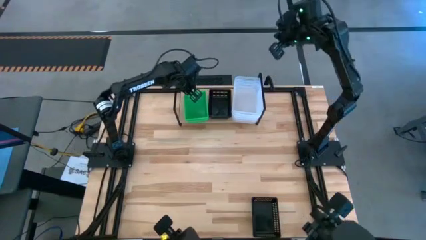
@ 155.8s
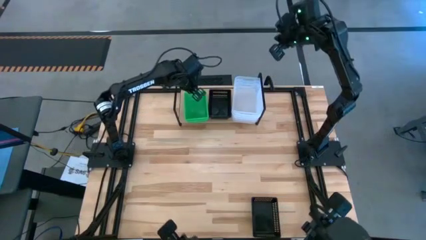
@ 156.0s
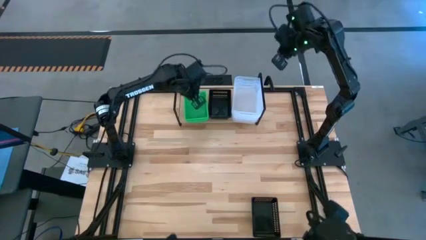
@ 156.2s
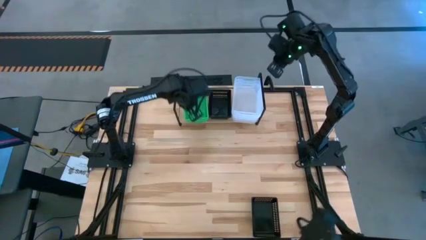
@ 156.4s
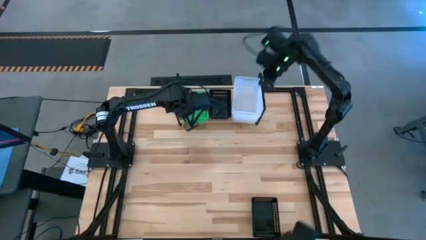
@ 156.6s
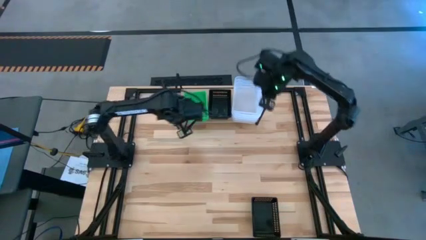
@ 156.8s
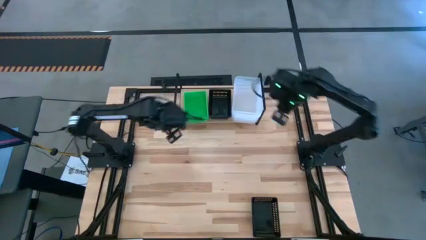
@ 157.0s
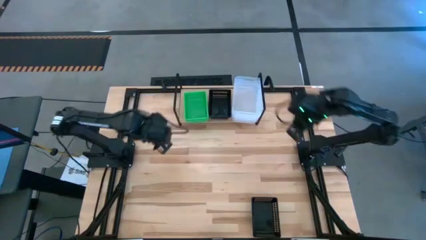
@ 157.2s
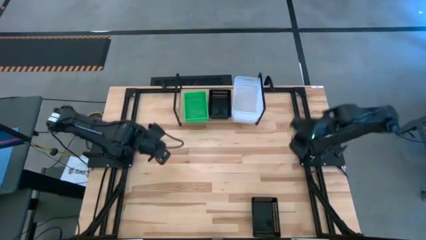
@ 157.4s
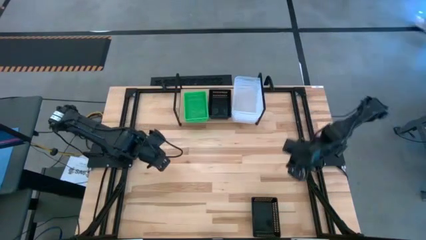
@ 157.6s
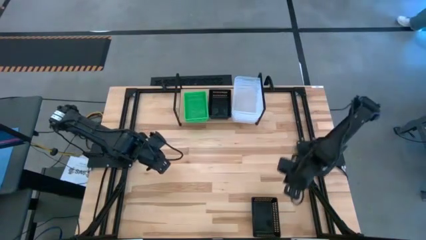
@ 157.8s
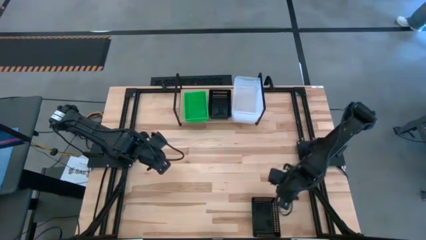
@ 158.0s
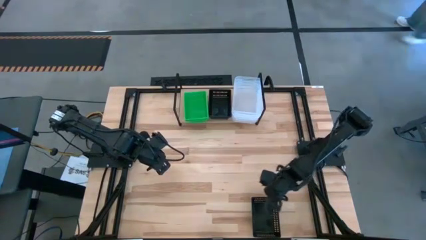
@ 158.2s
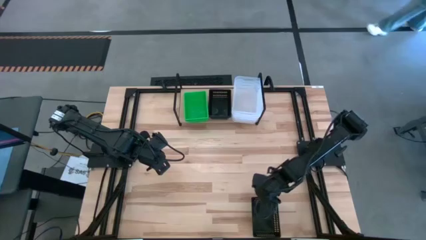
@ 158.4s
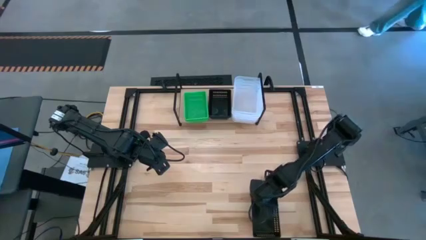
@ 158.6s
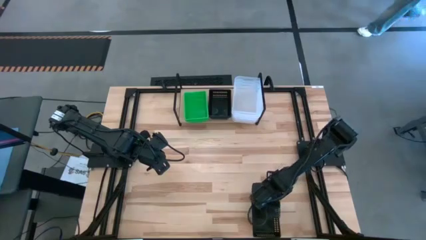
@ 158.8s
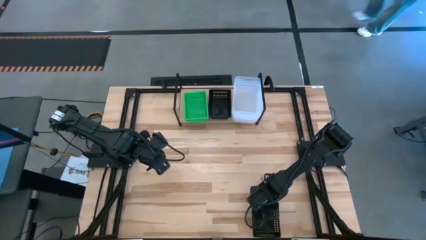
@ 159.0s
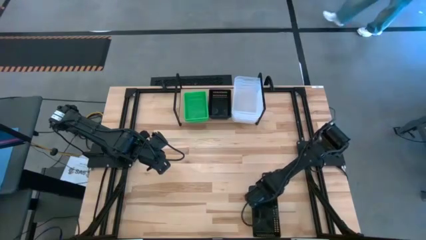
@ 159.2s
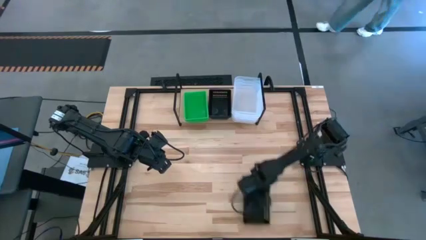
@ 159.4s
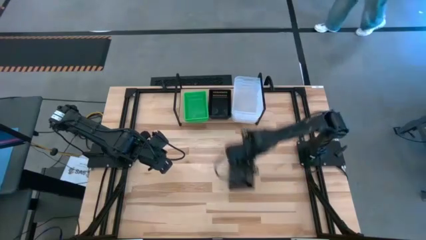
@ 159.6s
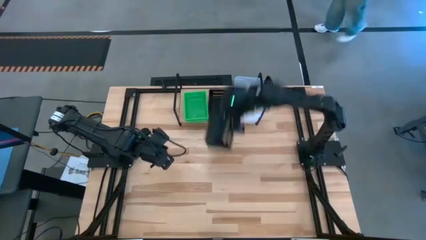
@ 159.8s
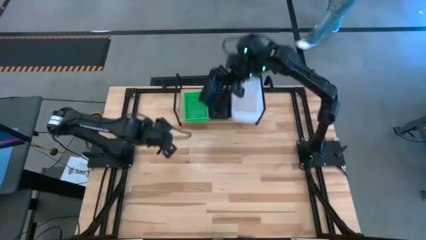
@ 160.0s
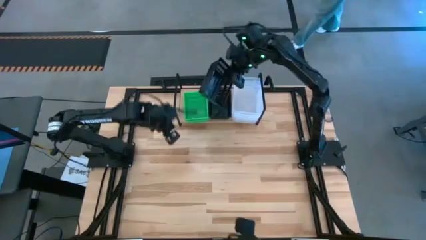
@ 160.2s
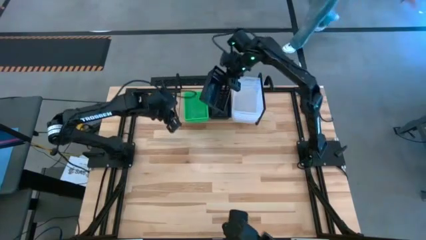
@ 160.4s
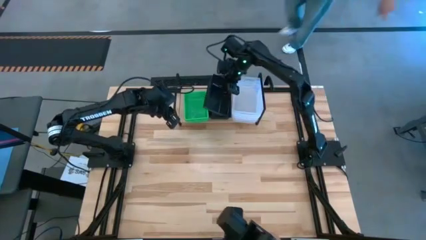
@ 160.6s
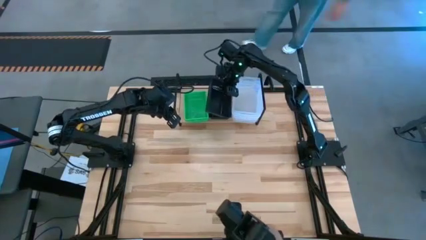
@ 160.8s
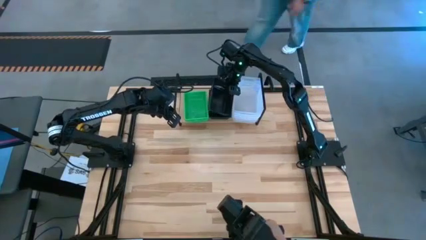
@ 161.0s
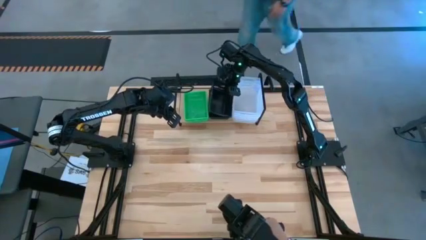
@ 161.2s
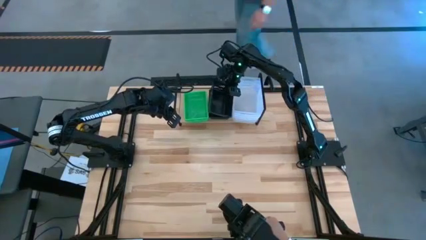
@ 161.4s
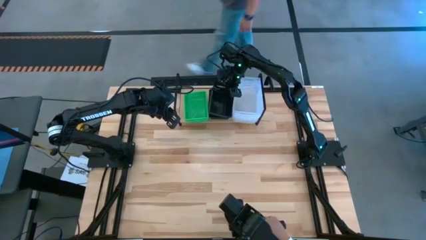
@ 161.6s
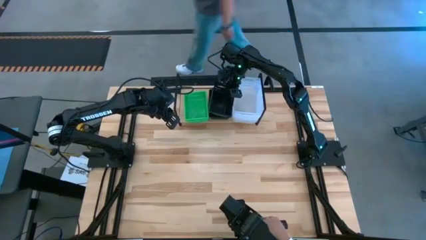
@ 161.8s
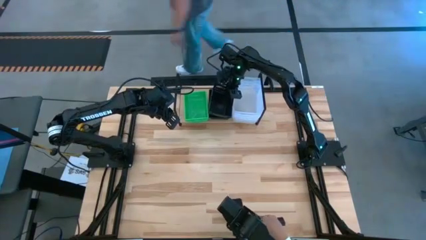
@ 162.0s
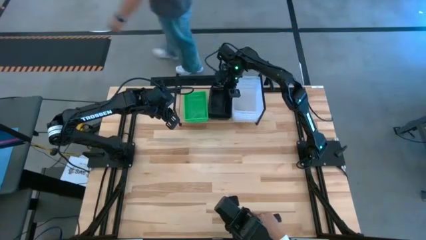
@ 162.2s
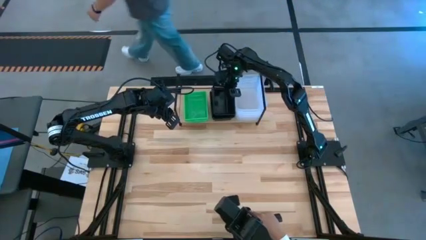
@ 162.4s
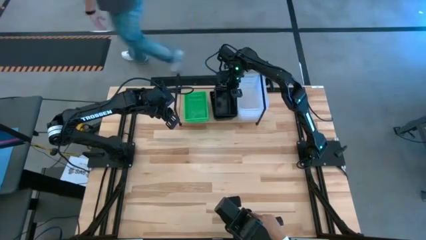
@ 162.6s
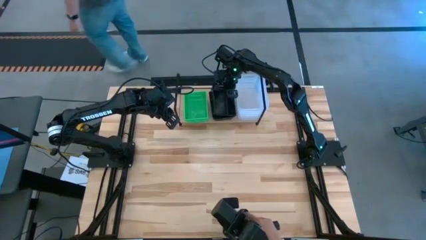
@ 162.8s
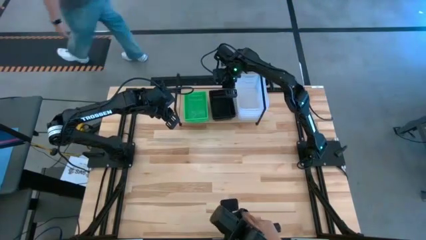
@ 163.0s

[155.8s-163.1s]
Task: Stack baskets on shelf by color
Stack the black bin into the black bin on the shelf

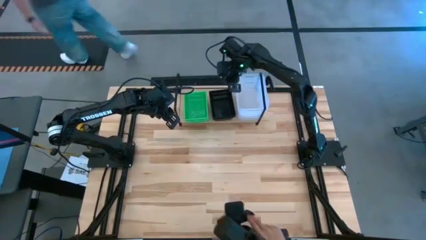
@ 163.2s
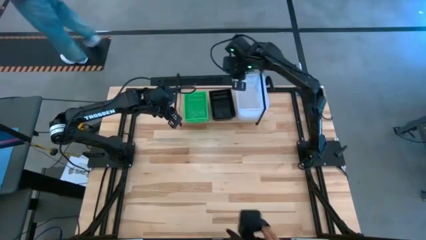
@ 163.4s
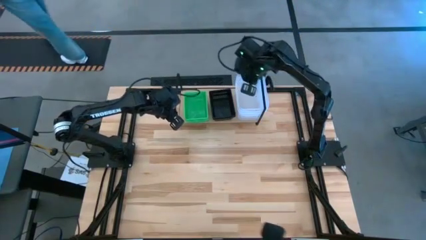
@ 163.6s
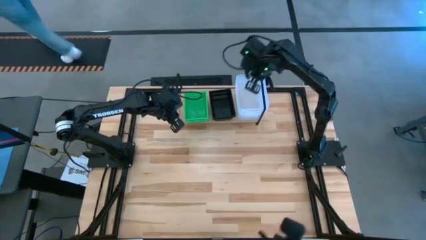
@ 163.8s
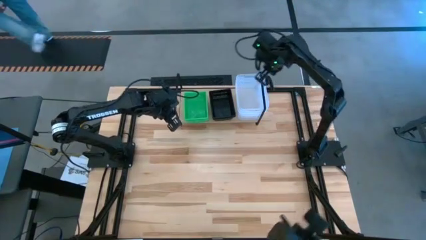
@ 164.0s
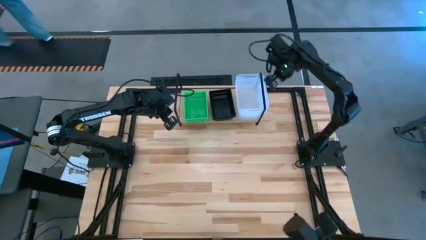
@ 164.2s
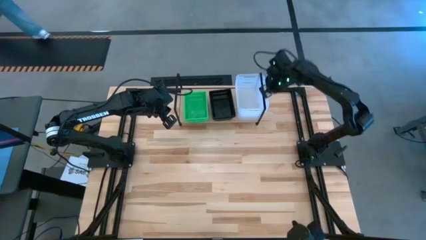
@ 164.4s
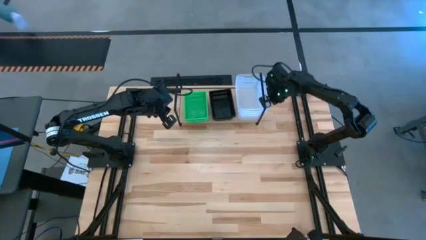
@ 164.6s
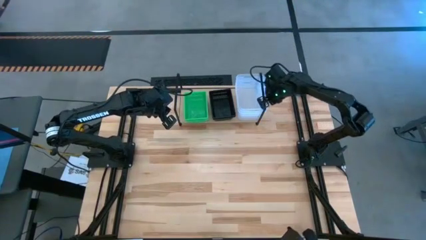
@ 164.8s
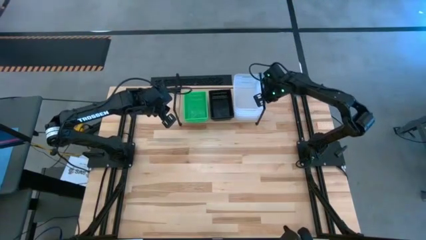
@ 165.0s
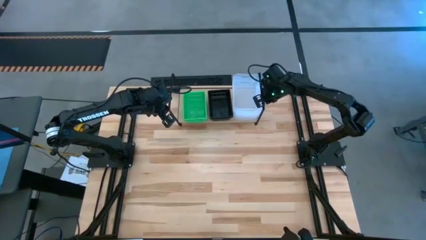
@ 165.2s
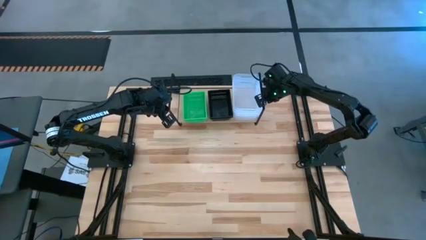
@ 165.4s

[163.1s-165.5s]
Adjust the transparent bins on the shelf

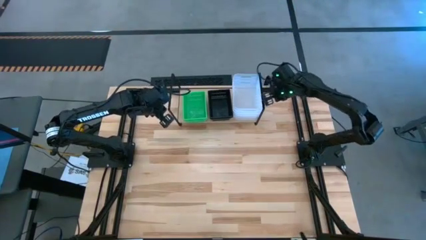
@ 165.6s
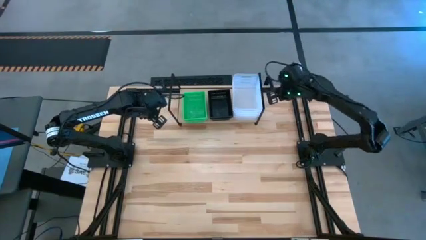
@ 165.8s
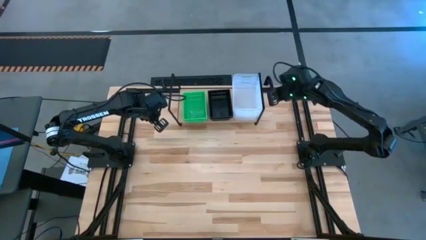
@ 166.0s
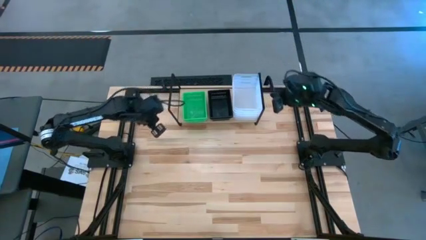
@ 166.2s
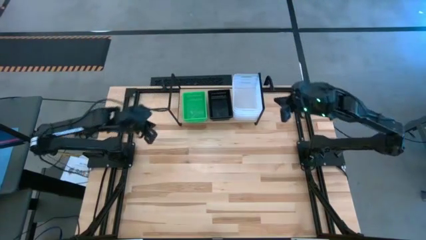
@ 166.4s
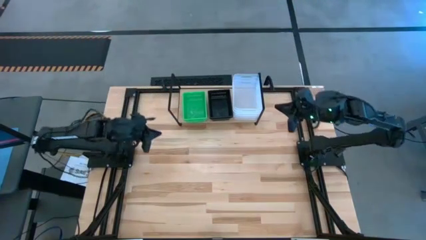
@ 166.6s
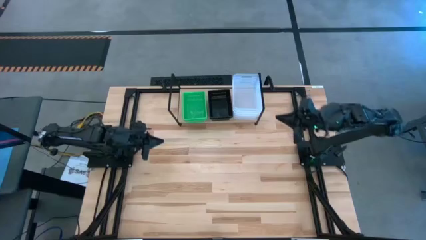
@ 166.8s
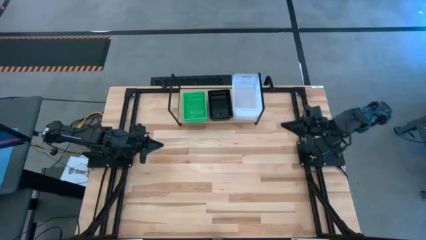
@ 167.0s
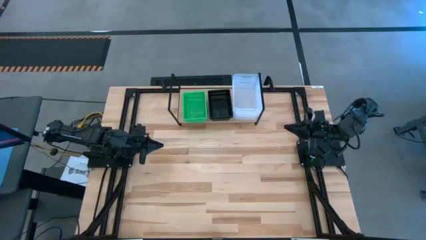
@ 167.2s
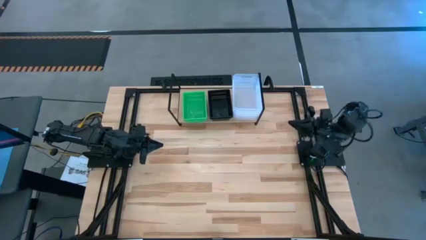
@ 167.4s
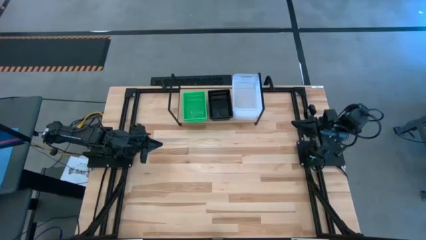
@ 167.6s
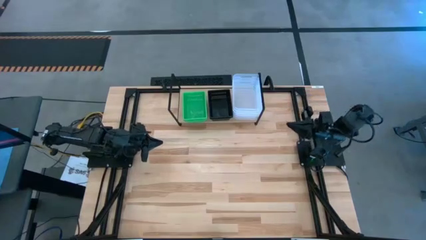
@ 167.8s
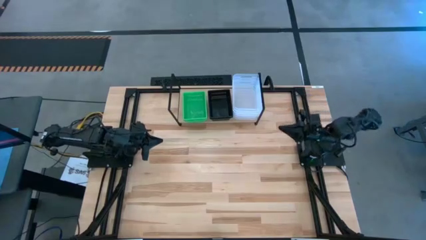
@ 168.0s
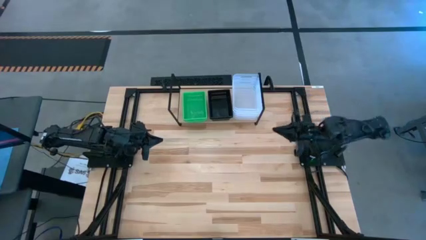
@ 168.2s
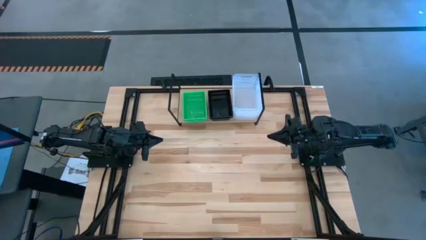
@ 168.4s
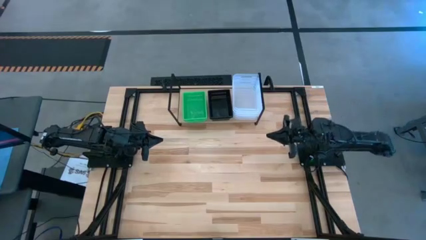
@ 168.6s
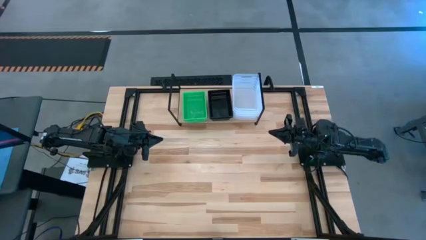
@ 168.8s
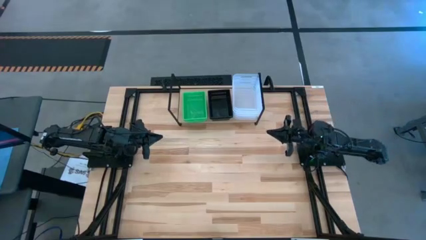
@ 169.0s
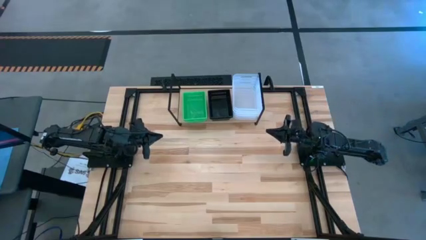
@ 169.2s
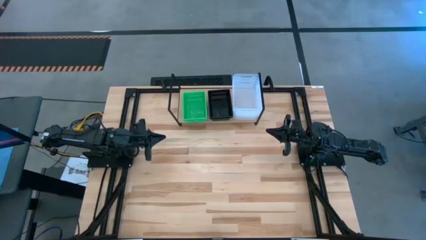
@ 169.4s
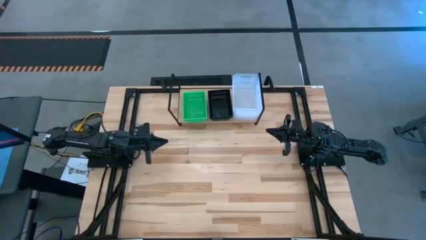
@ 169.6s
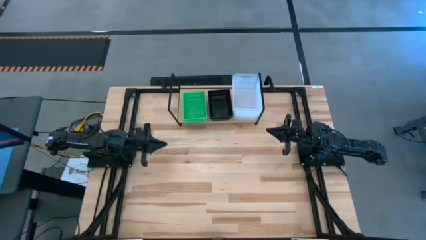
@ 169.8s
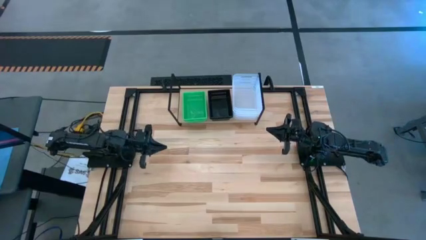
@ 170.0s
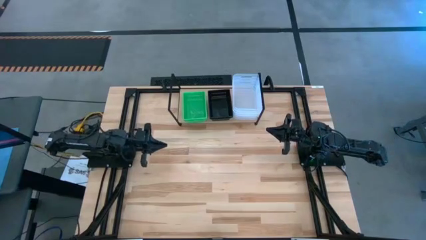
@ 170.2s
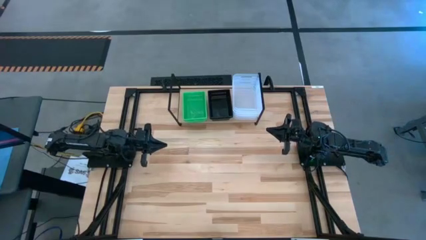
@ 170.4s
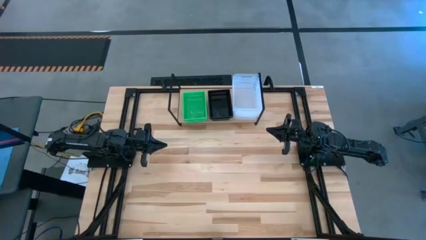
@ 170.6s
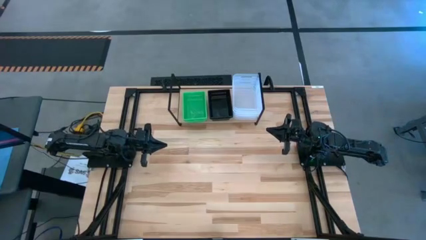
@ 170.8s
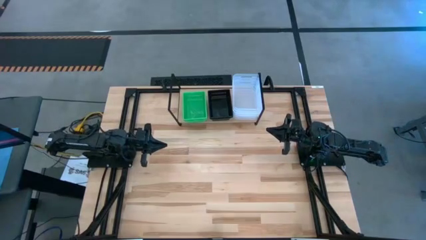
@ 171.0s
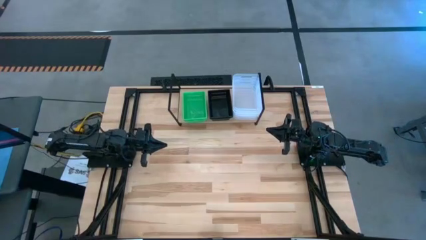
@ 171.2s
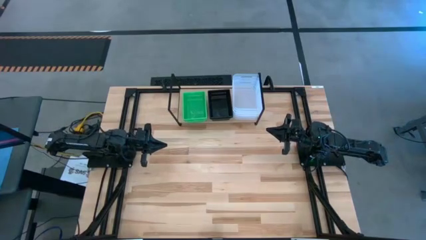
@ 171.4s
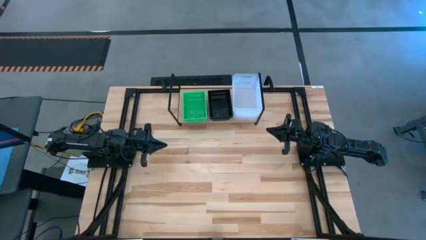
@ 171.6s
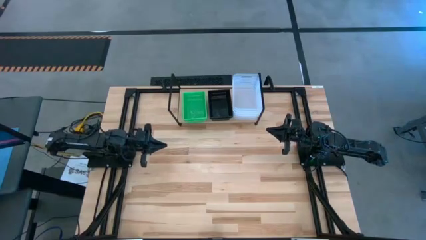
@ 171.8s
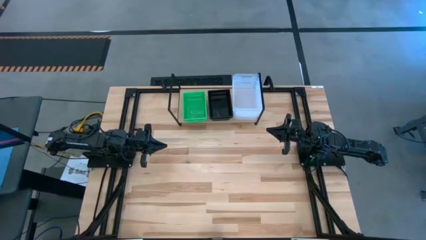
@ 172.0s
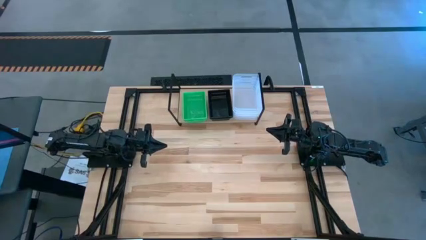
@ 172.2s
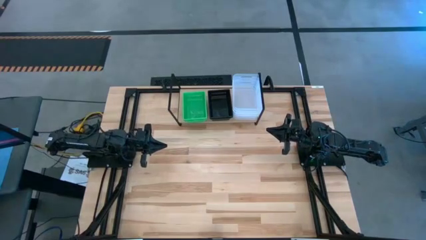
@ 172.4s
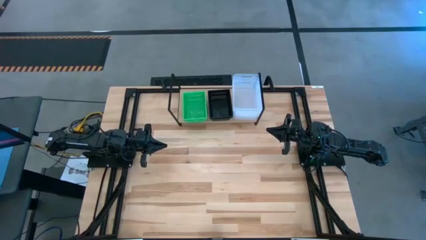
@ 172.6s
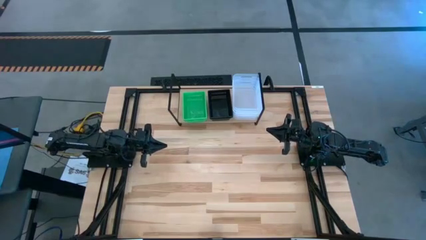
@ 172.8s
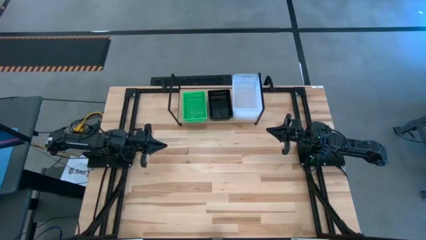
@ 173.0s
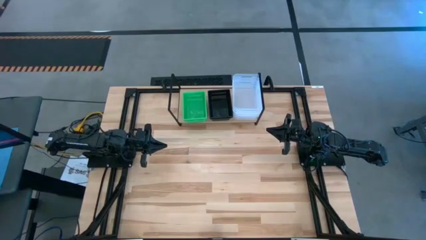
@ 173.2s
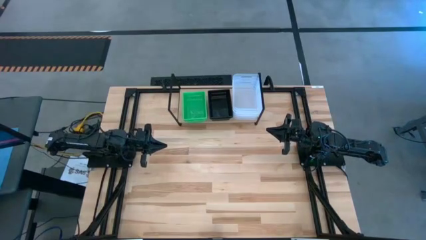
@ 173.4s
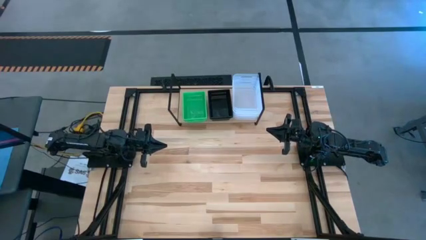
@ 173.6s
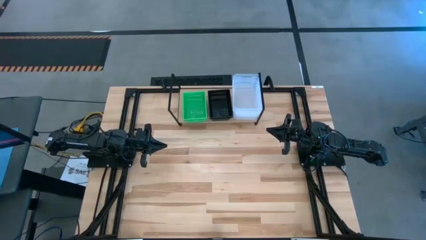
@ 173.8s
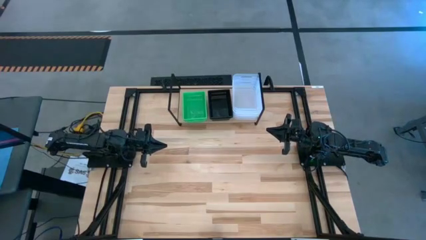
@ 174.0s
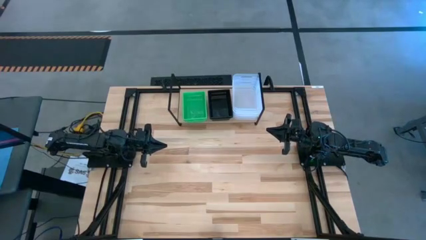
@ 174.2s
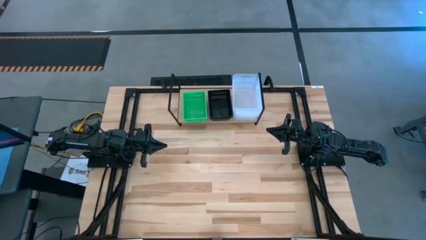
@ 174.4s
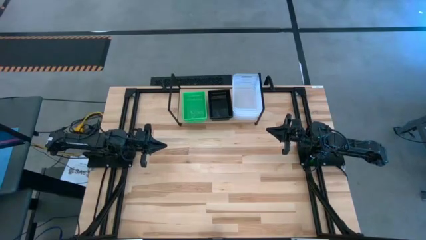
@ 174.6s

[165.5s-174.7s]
Return to Home Position
